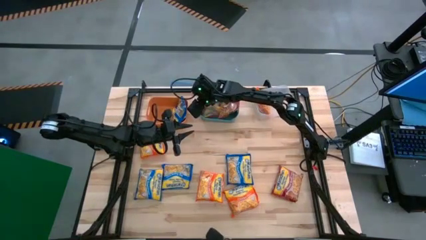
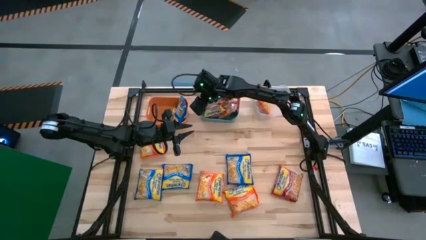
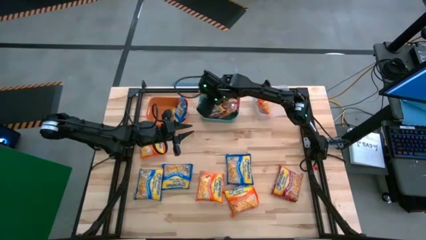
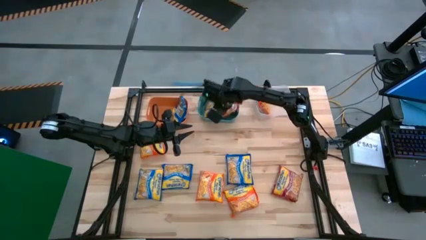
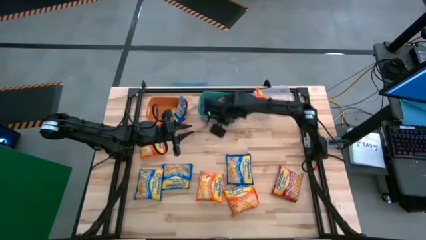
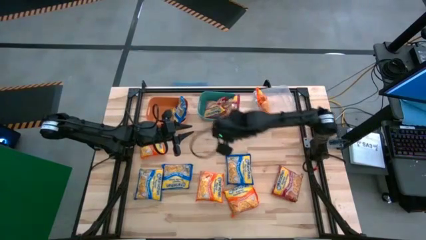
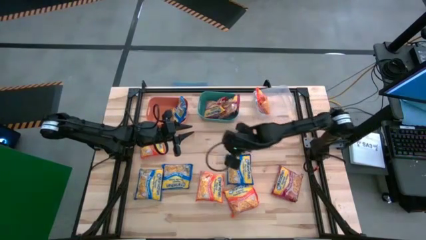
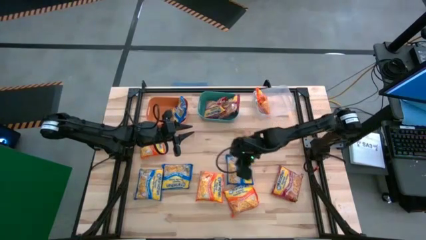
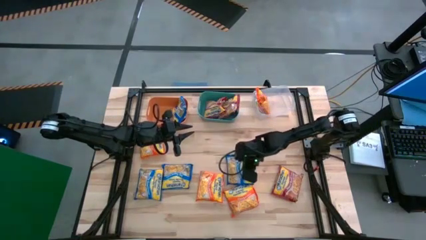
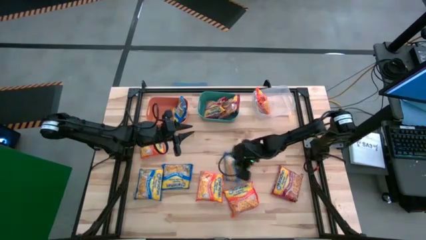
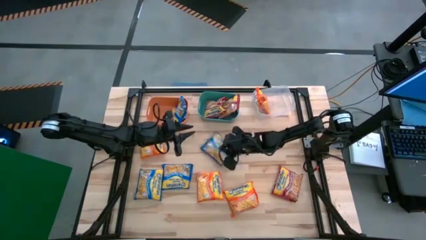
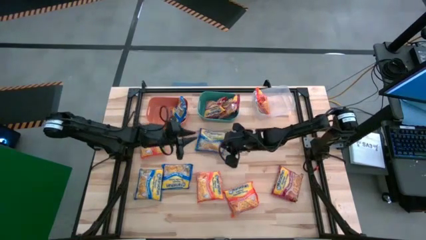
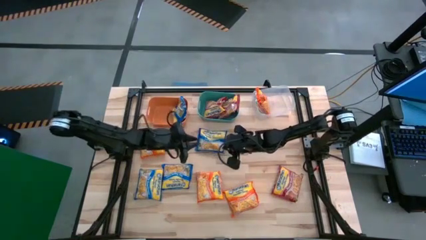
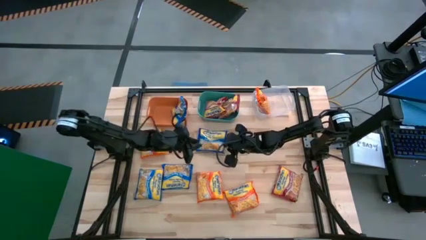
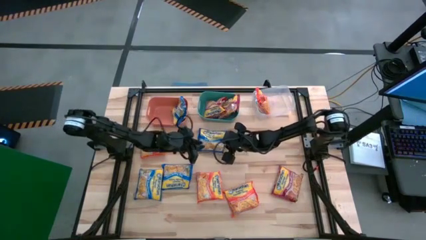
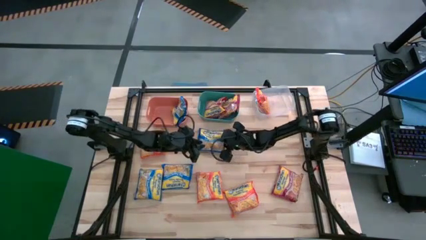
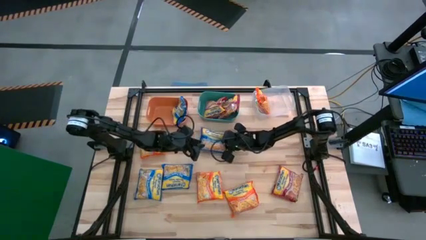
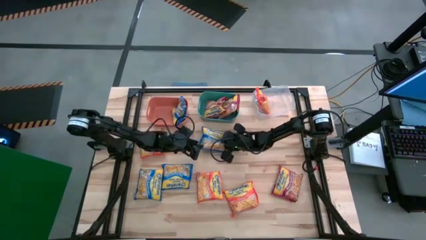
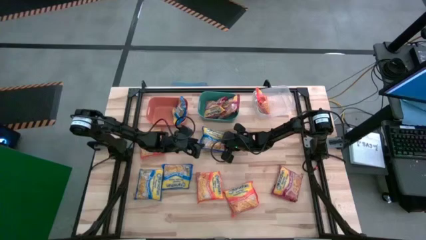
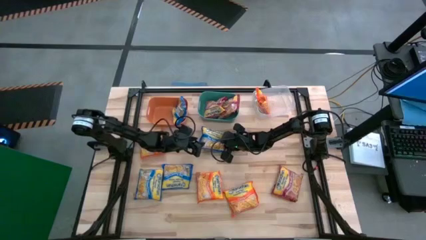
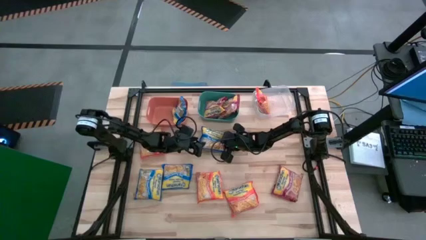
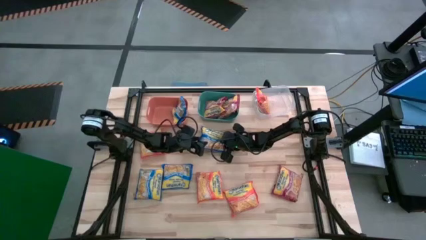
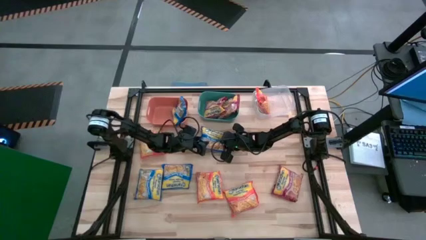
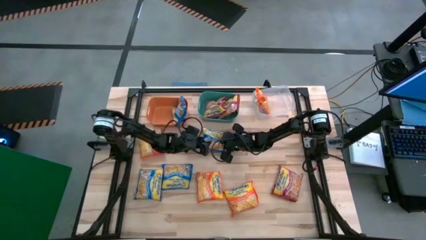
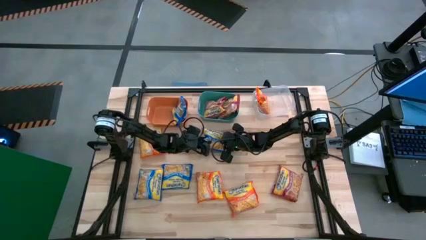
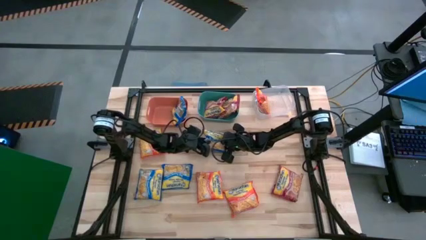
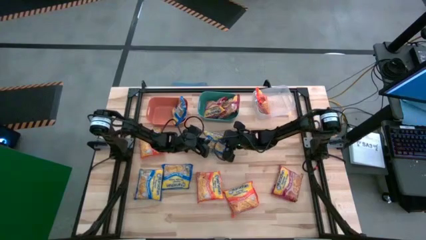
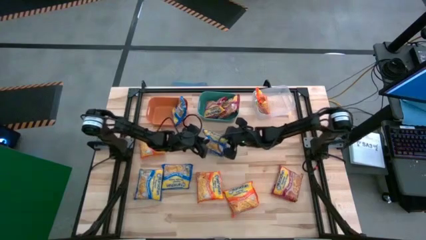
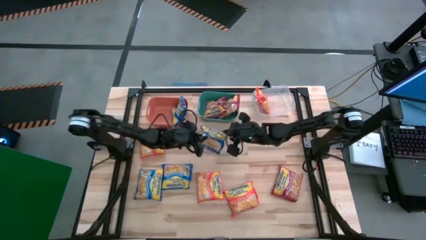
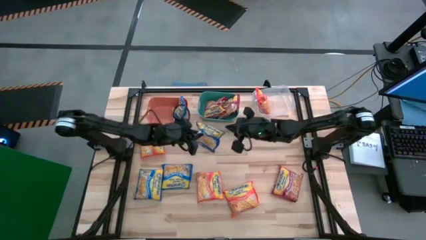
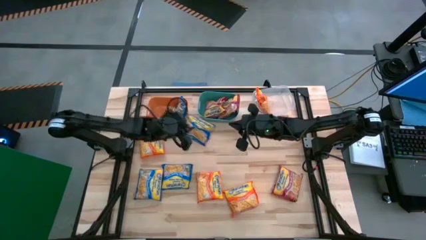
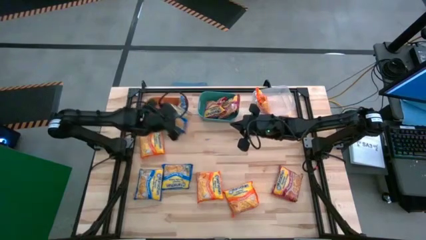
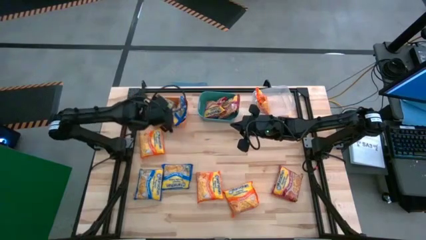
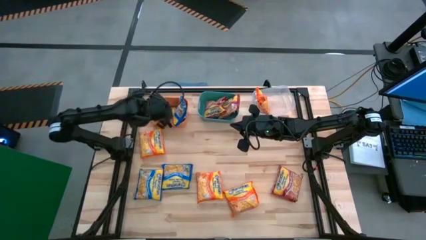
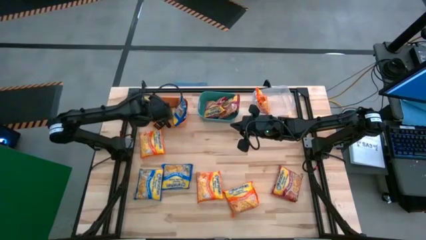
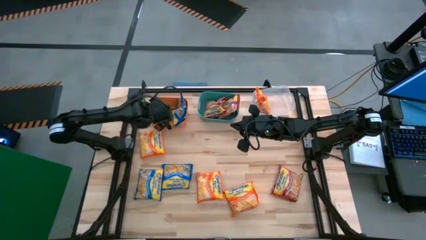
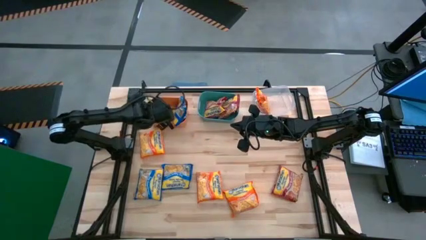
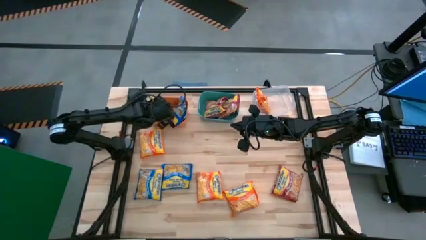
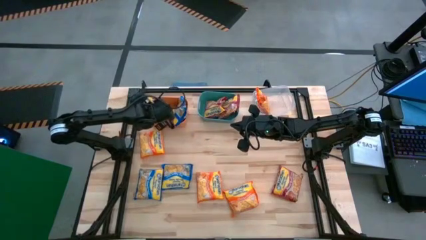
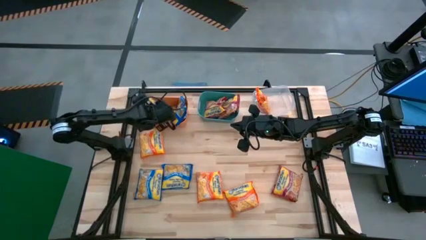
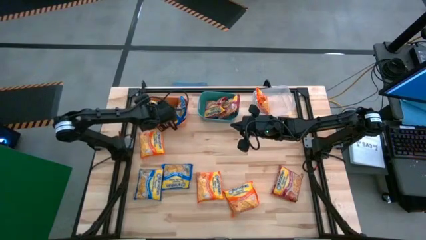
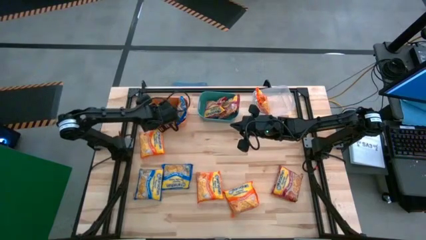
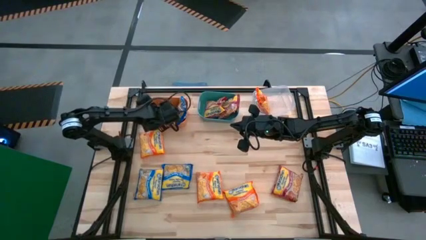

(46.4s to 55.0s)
Task: Sort Maruchan noodles
Put the blue noodle pack into the orange bin

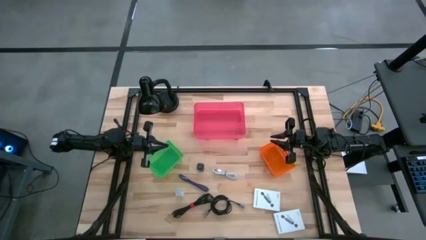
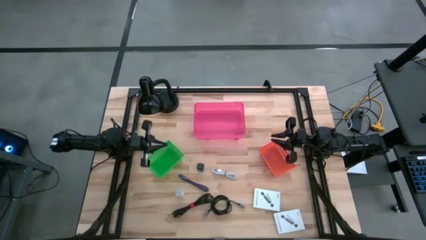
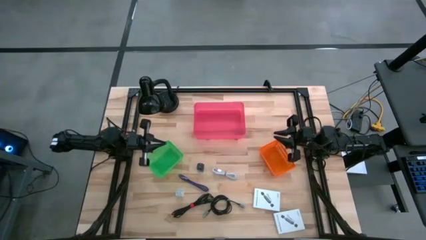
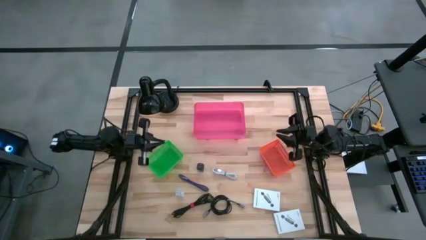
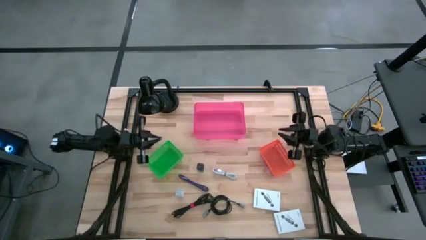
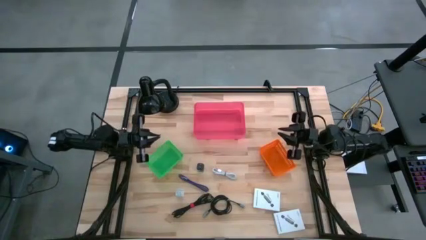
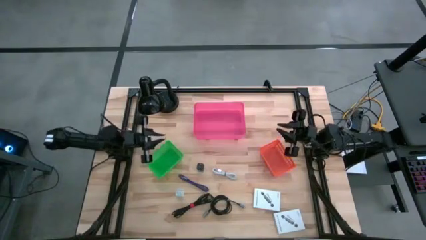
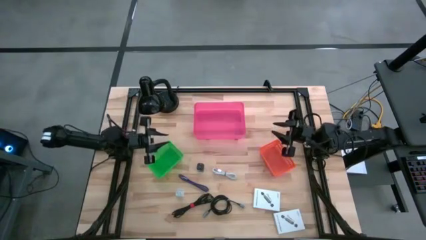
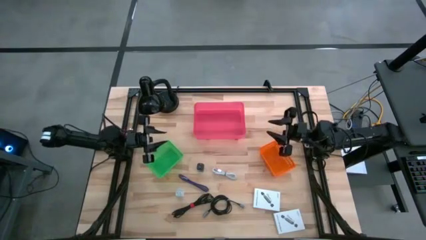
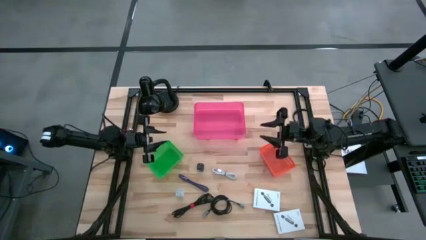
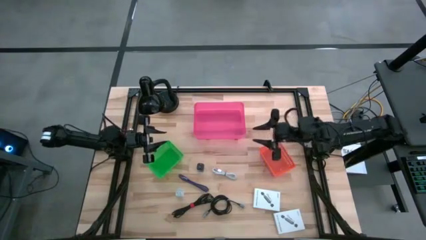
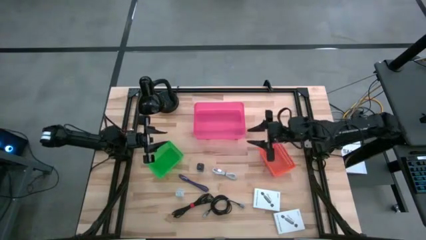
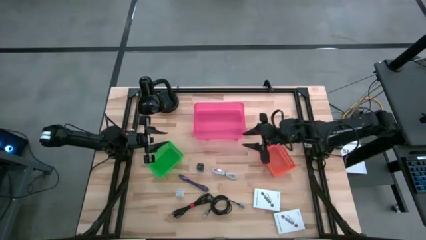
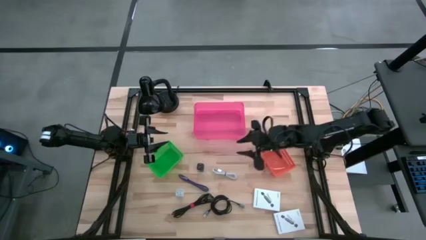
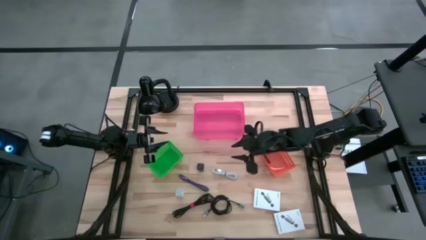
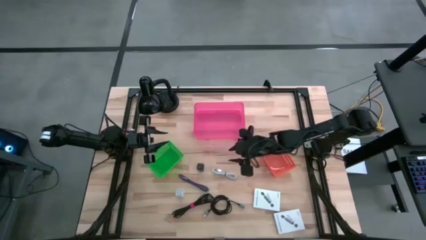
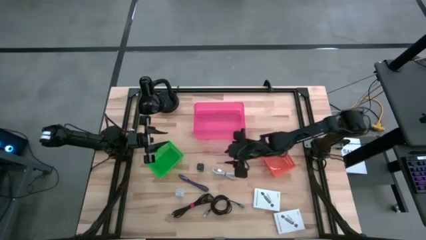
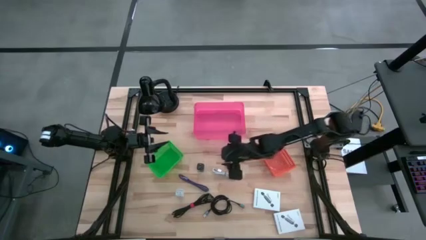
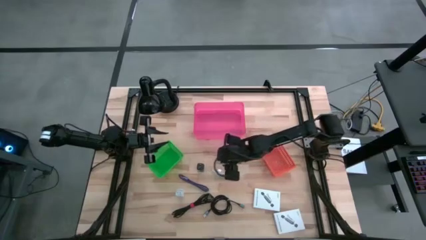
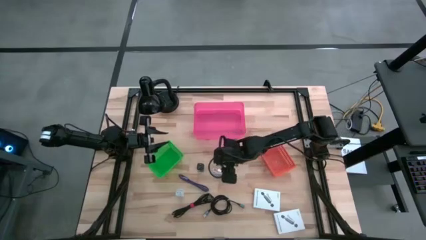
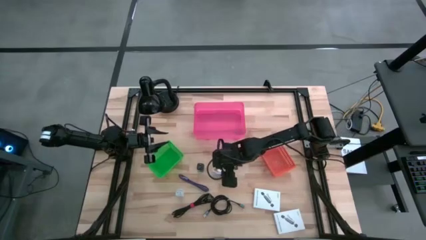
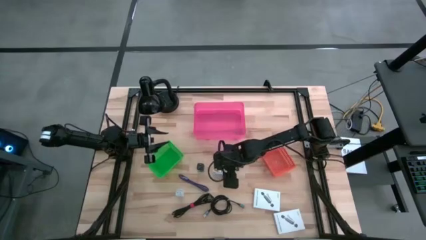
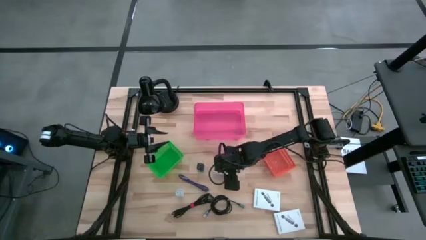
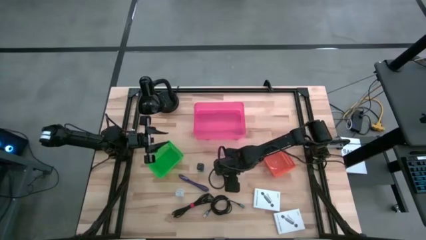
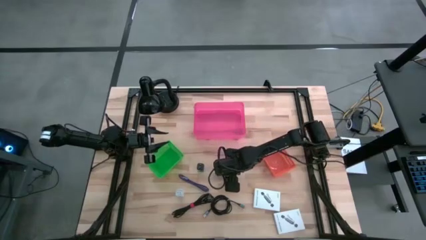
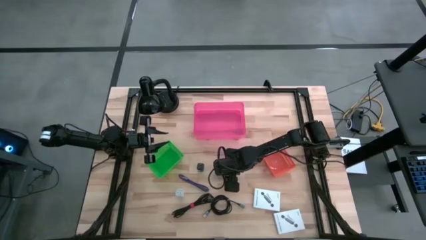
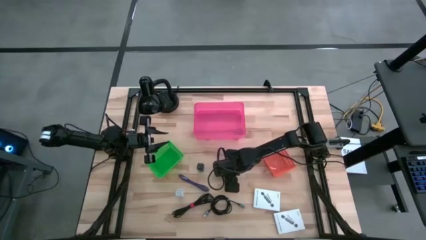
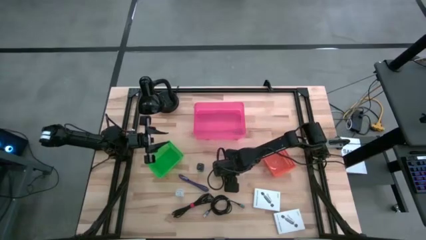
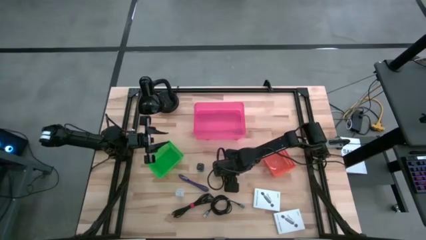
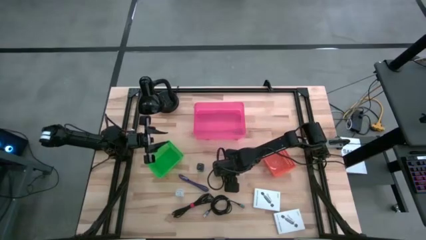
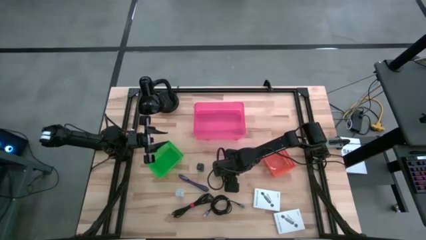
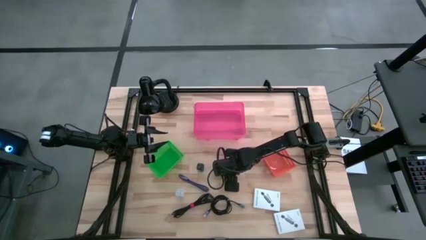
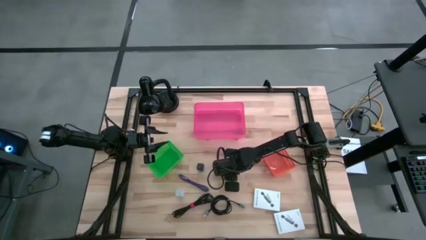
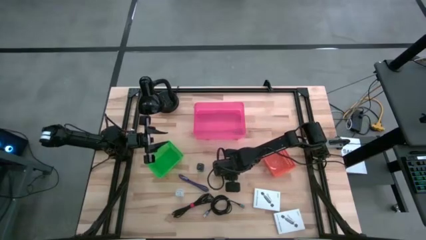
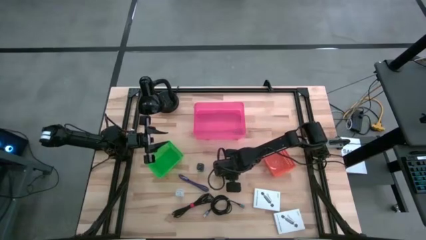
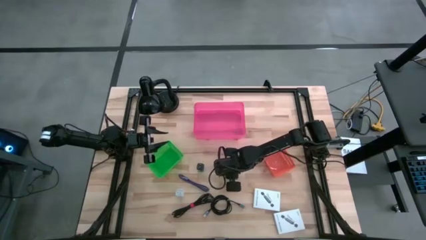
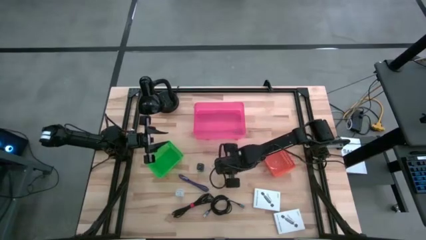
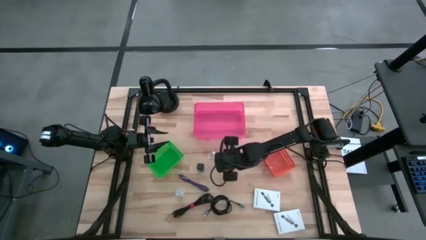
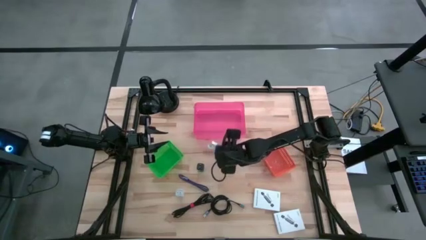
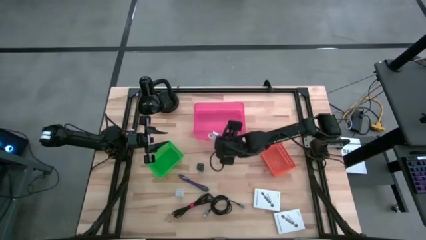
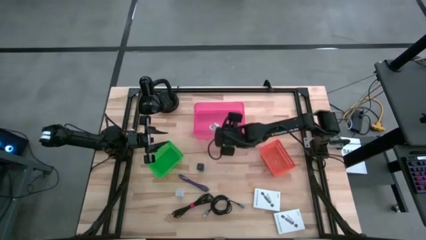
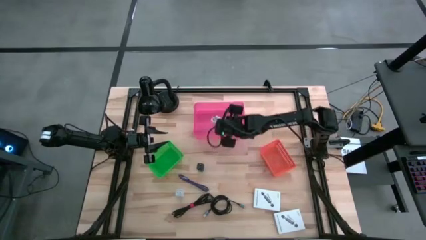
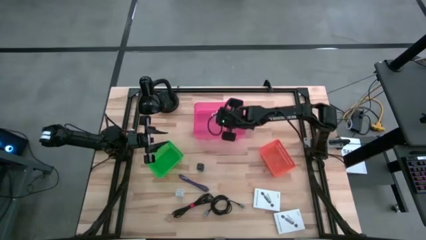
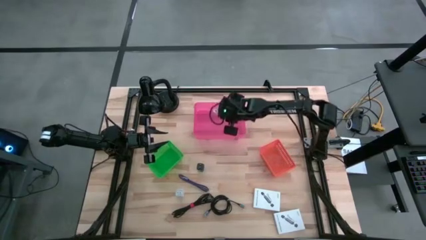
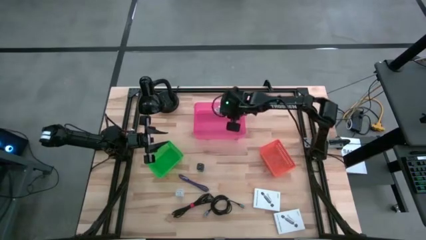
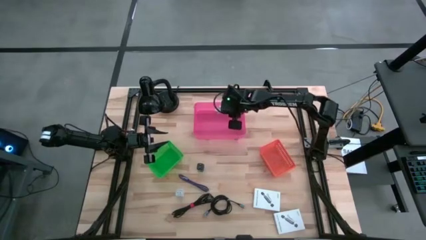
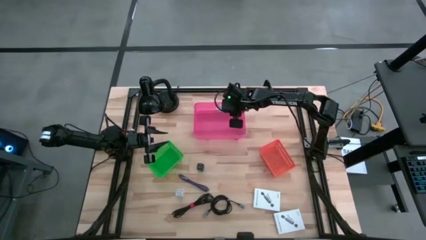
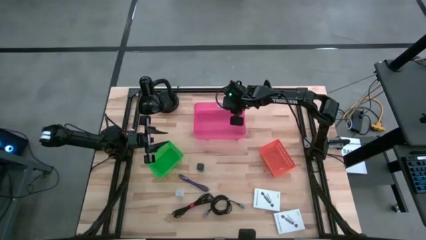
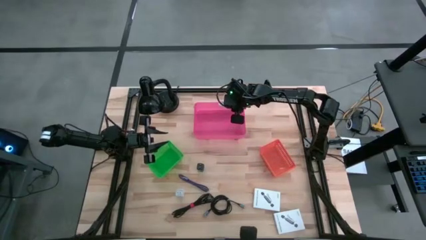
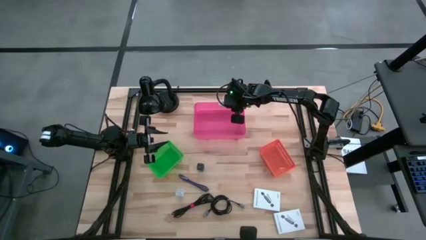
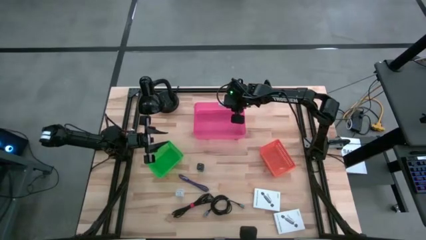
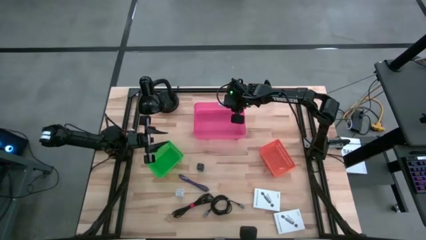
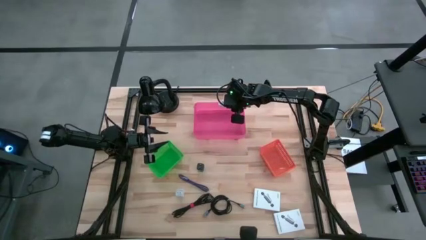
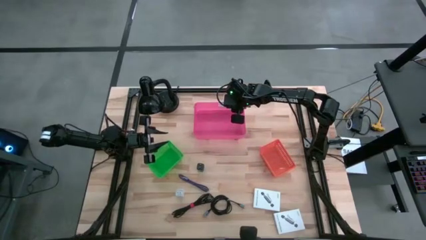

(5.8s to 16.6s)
Task: Pick and place items into bin
Put the white charger cable into the pink bin
